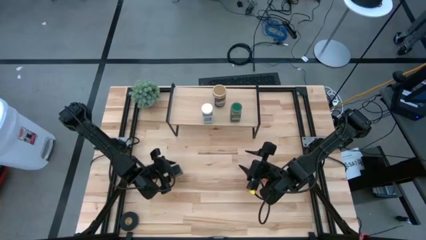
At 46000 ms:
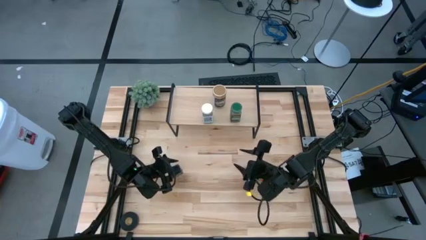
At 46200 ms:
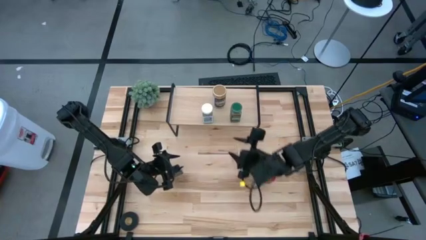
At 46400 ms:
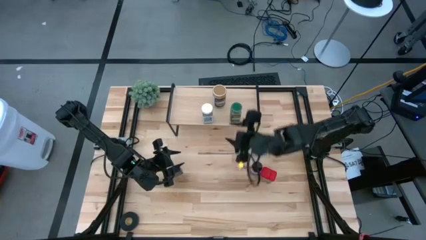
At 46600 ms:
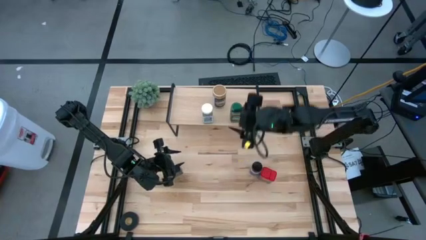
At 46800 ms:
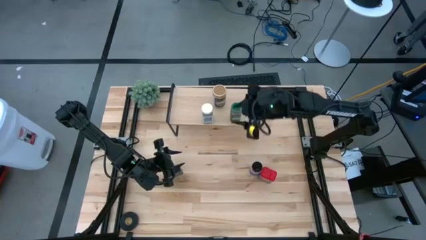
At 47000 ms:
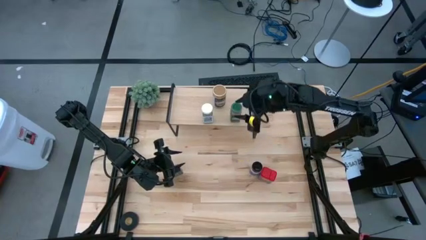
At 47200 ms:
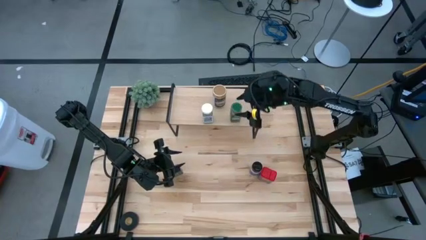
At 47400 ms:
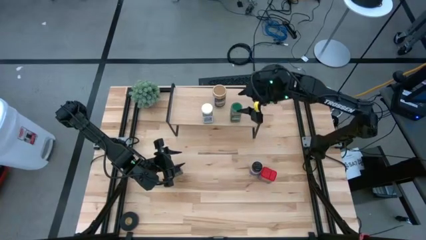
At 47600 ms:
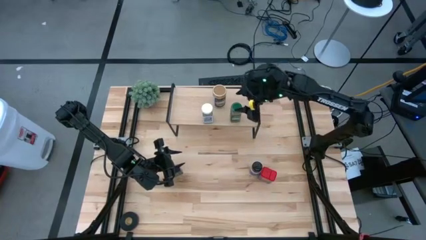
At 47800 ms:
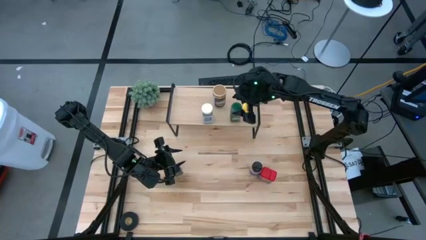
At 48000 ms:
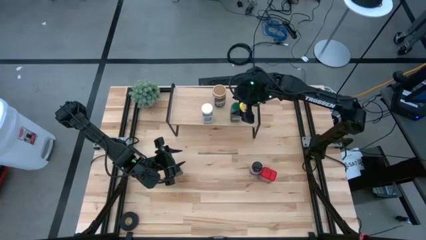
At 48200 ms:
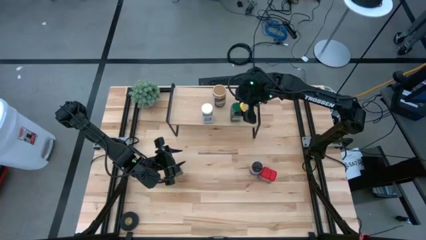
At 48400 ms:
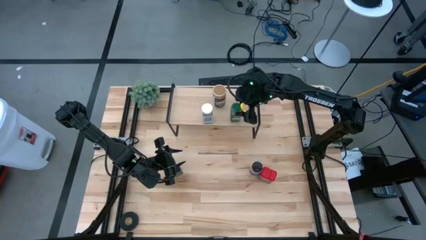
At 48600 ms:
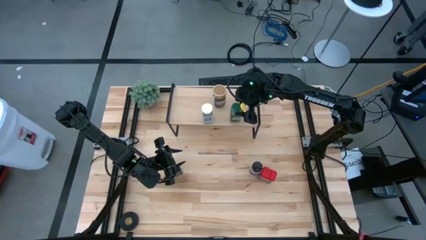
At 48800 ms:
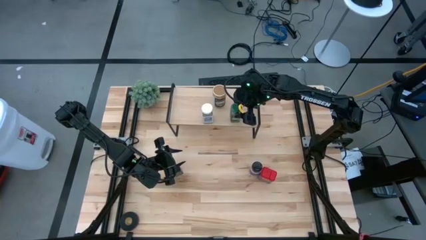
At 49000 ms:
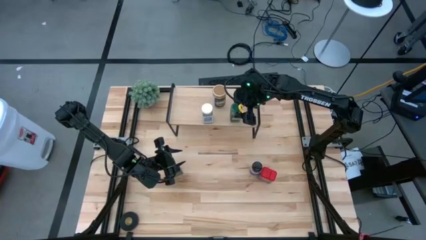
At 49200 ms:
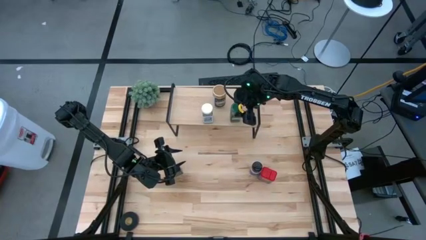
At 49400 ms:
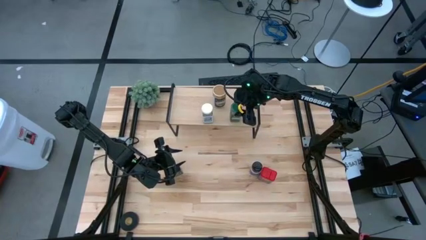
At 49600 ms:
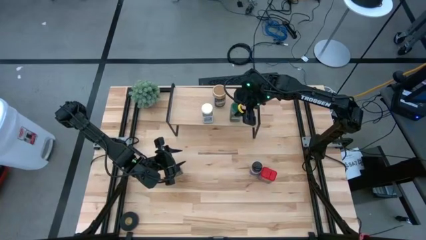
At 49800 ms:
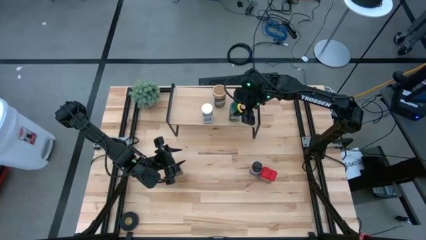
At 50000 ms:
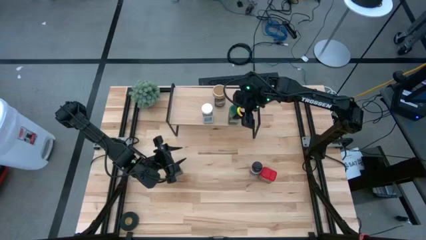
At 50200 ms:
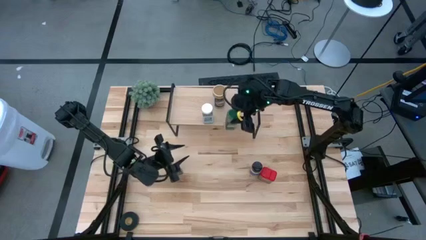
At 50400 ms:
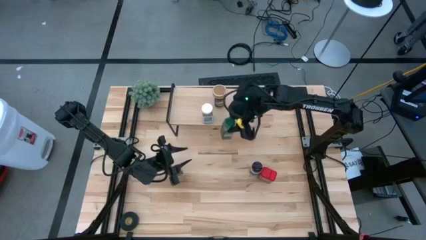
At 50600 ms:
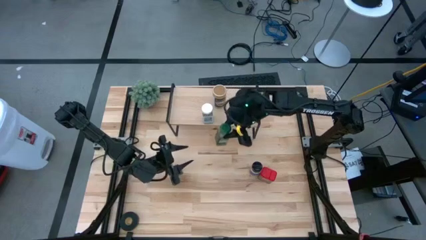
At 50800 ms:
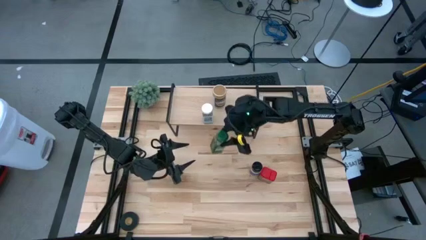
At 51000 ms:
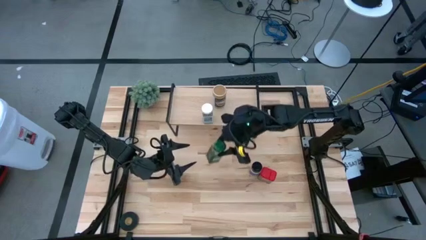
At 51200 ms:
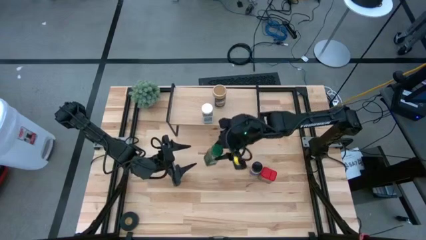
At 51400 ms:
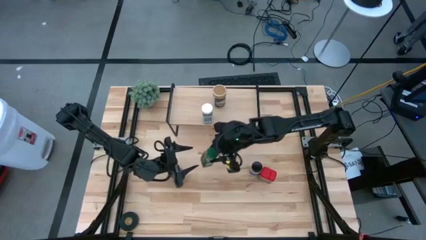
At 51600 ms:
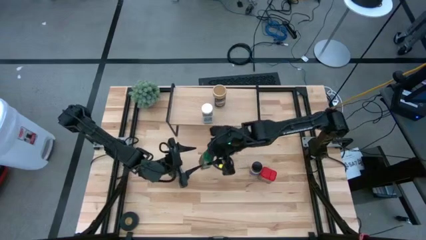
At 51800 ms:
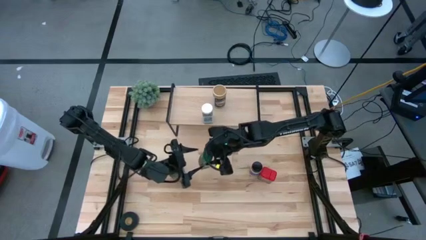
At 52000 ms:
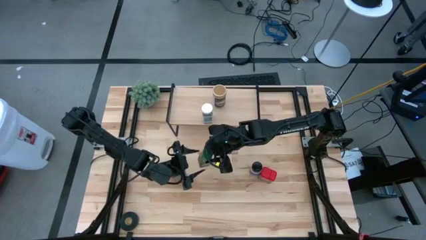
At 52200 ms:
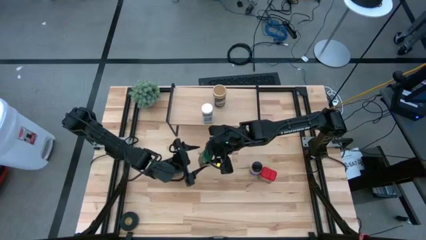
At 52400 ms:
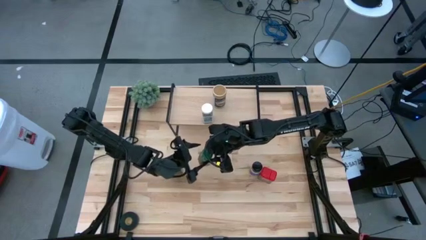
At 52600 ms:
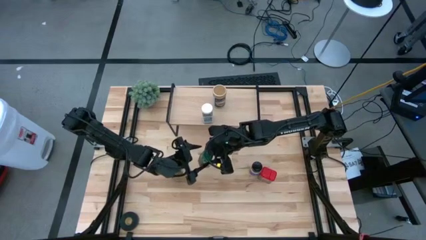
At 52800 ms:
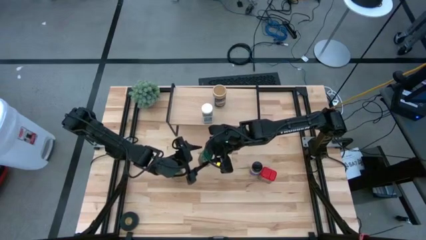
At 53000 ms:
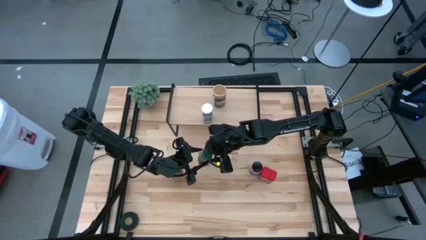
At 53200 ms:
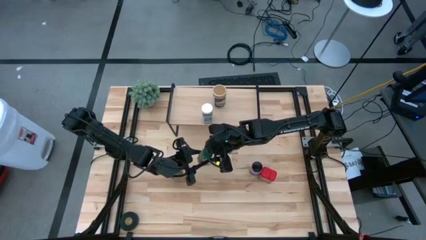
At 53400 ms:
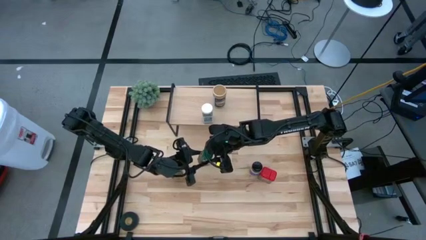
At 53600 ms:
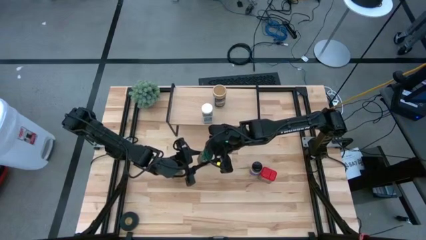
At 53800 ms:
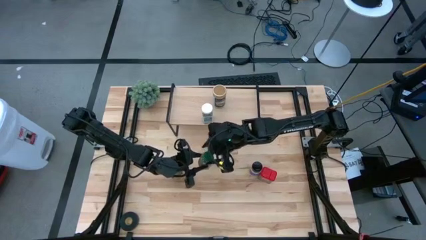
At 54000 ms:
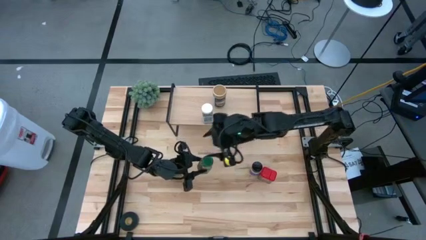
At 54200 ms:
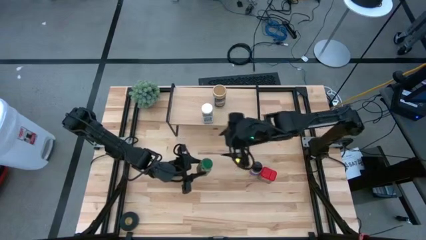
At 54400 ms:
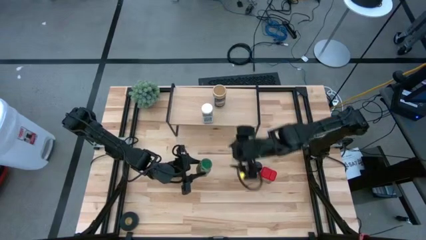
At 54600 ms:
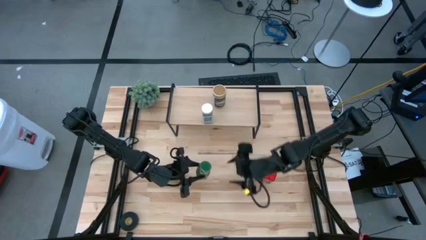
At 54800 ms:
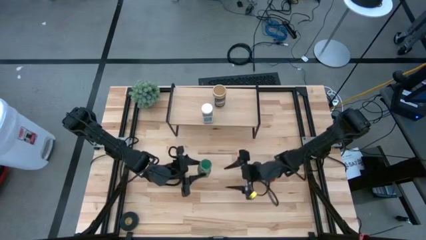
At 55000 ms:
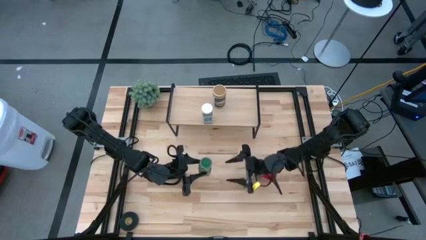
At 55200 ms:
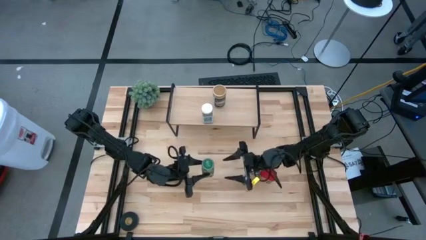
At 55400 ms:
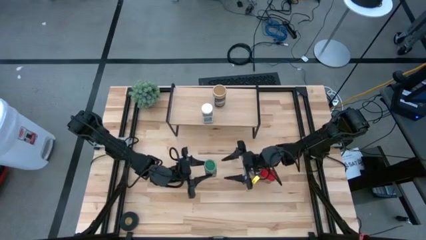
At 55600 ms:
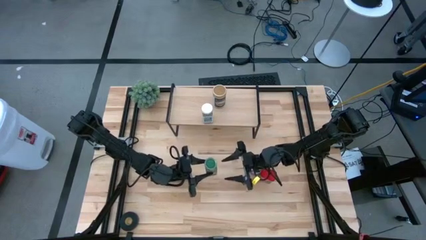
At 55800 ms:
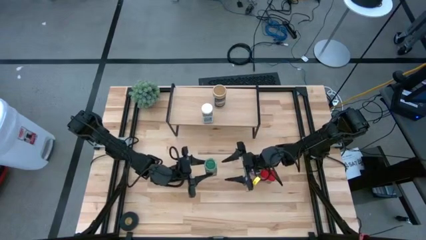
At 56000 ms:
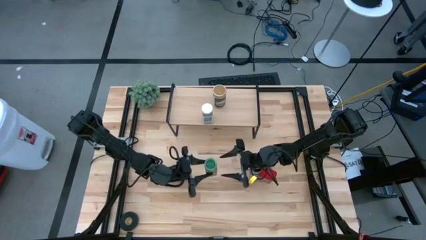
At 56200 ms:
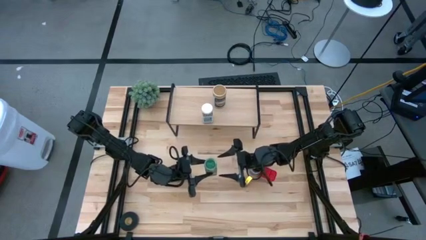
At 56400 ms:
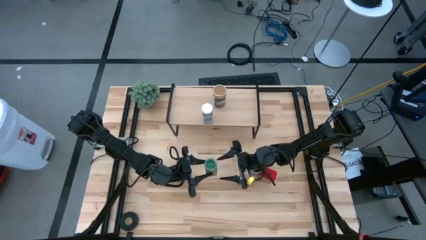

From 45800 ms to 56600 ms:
Task: Shelf spices
Remove the green seasoning bottle from the shelf

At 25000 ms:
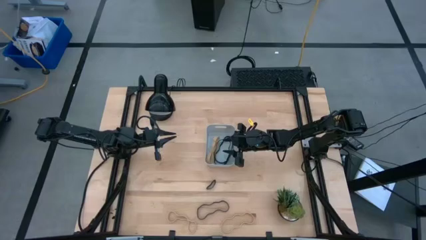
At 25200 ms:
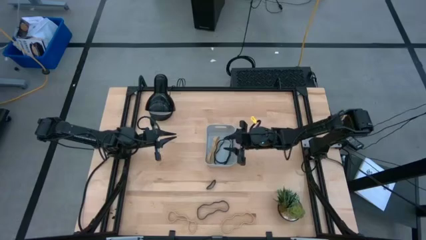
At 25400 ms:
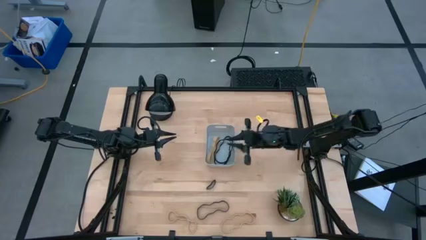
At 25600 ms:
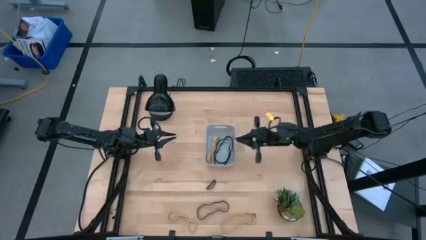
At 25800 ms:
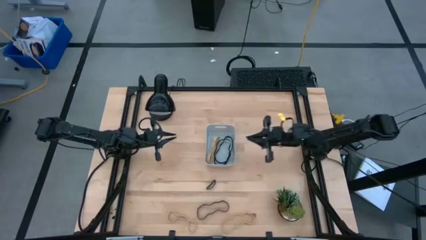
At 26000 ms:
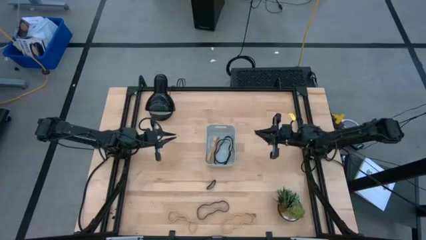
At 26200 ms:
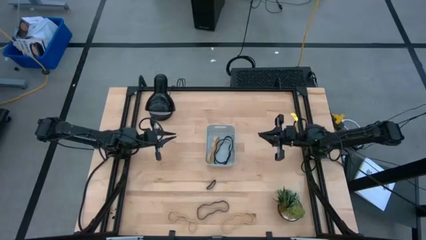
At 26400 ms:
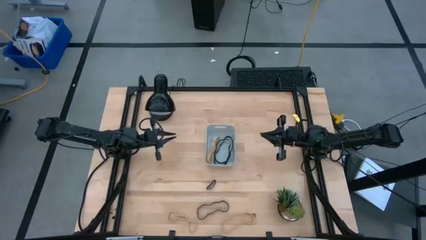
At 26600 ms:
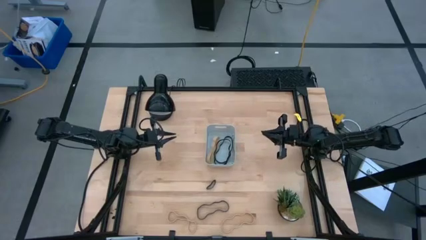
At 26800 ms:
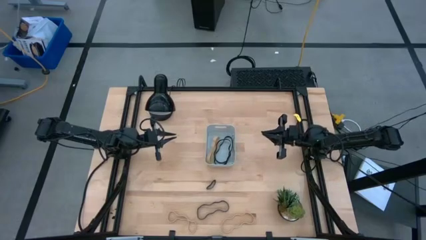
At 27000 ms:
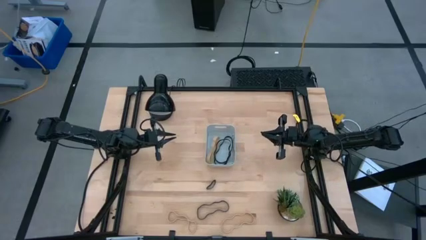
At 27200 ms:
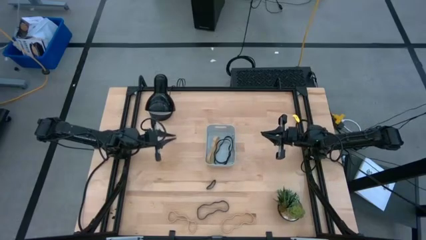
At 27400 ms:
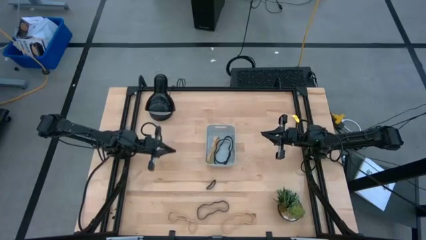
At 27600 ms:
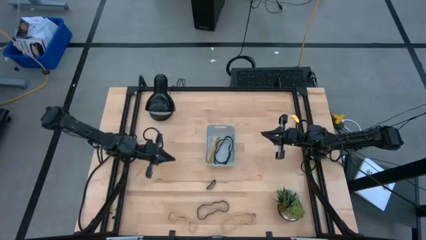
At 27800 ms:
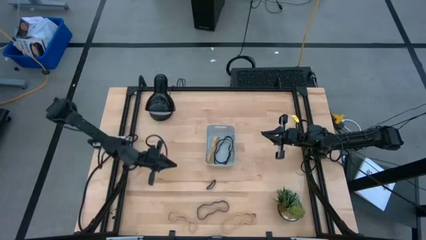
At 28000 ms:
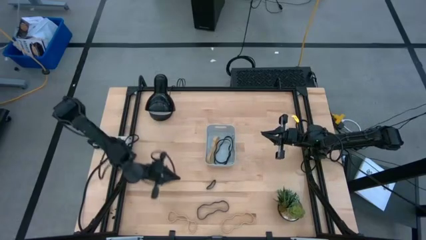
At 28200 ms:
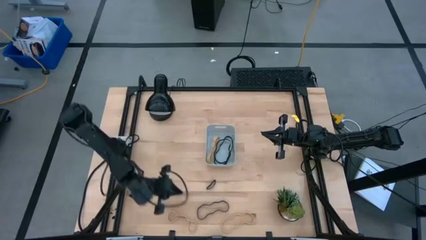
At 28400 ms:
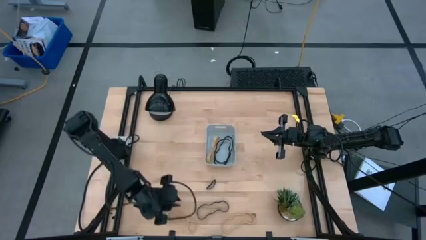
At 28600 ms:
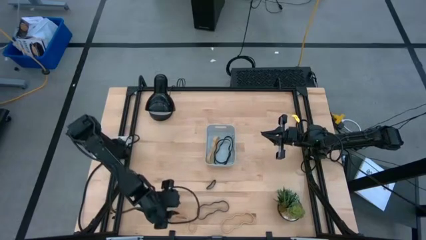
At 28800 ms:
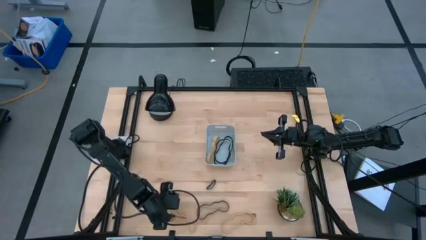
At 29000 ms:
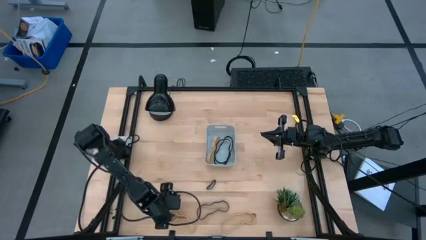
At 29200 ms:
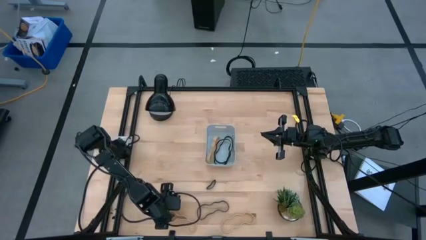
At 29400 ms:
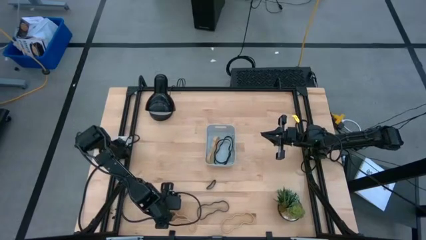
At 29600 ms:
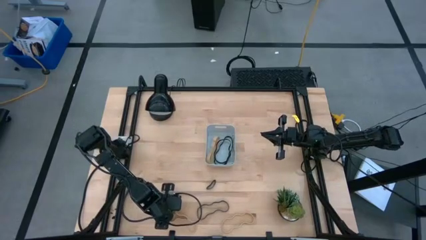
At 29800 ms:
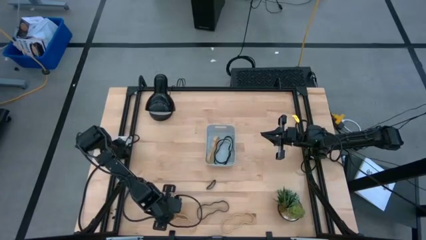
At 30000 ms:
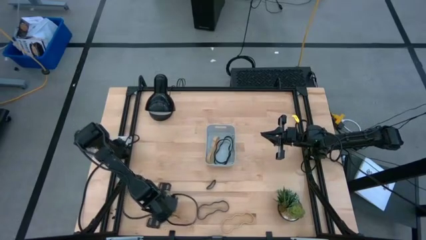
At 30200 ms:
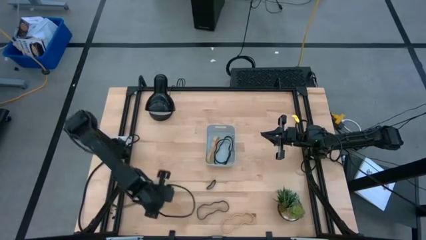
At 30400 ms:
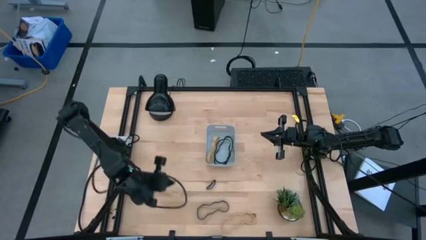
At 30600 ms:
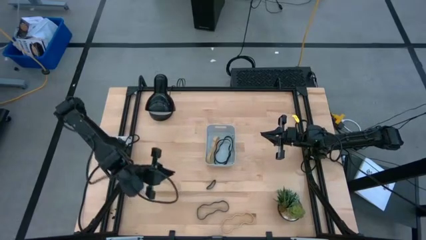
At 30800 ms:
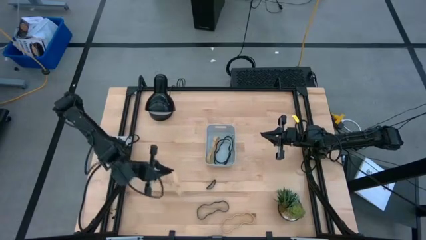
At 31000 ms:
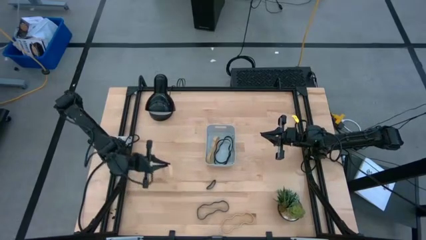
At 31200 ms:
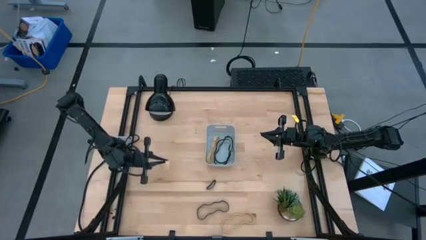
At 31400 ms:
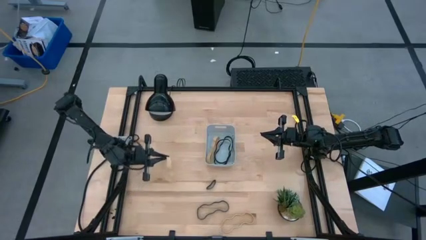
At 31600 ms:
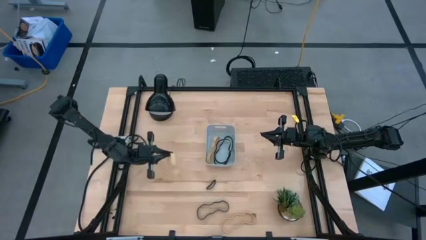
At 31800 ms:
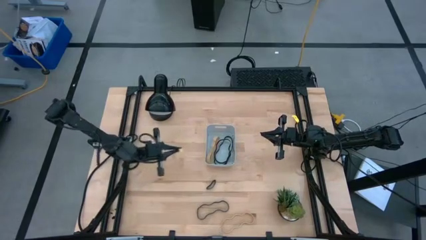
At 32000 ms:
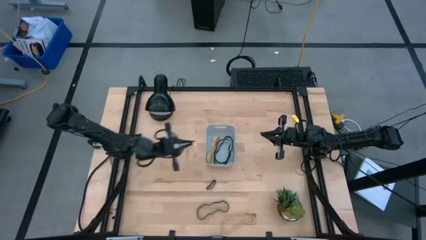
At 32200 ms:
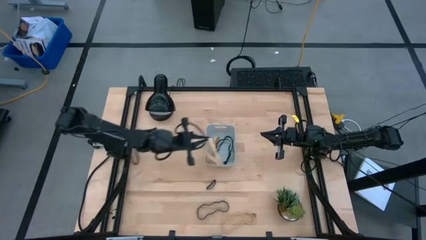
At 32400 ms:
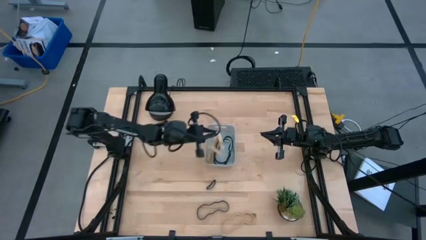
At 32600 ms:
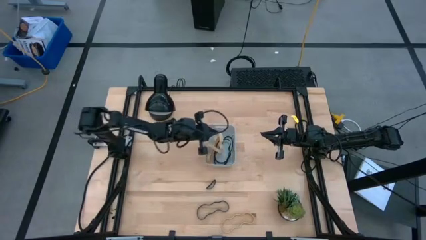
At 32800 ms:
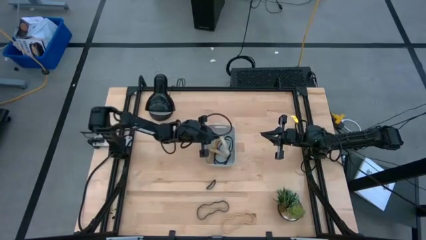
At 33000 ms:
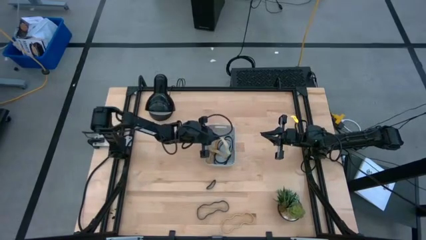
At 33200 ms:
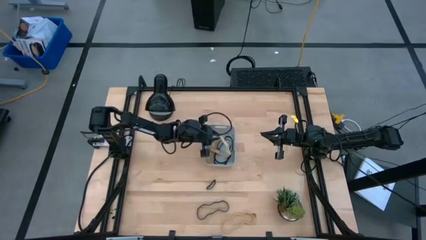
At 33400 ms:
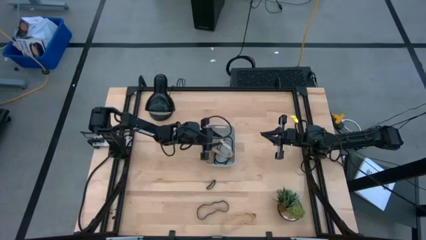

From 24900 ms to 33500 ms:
Task: Pick and place rubber bands into bin
Put the left large brown rubber band into the gray bin
